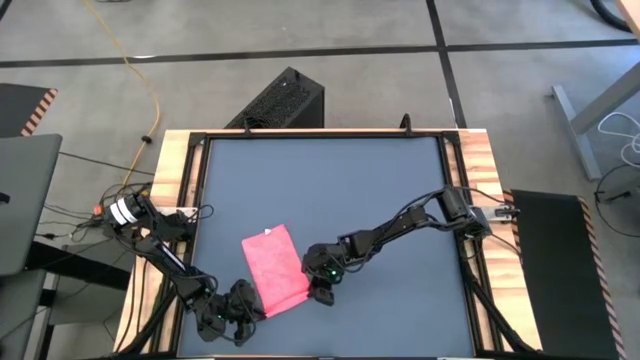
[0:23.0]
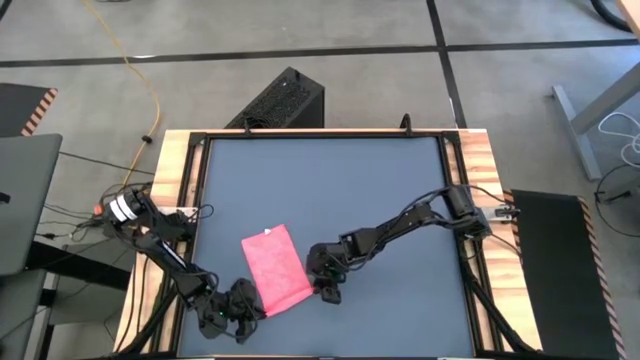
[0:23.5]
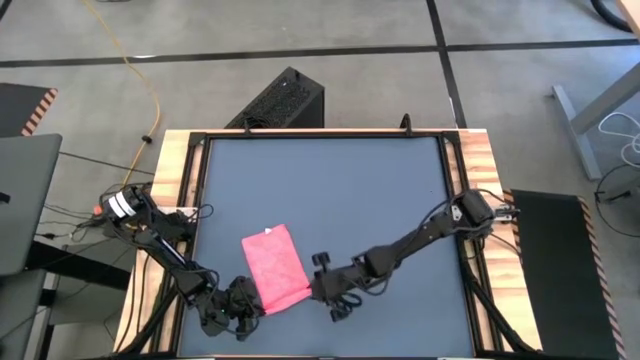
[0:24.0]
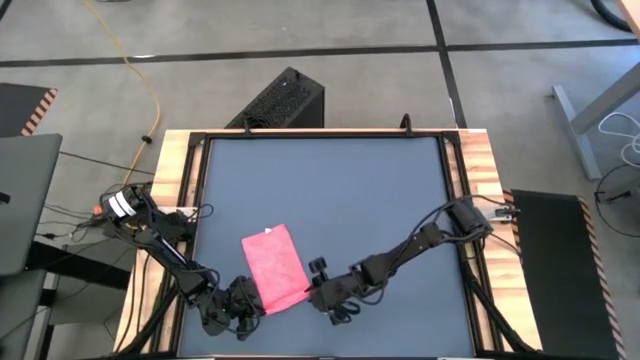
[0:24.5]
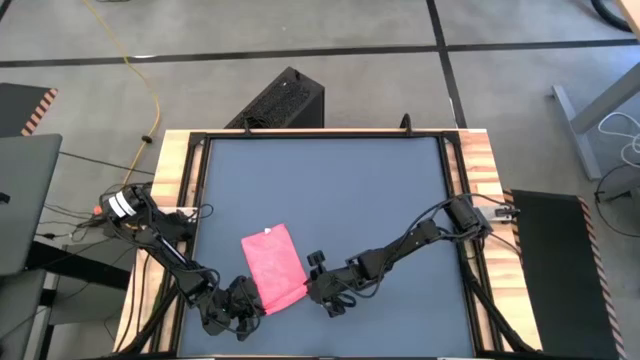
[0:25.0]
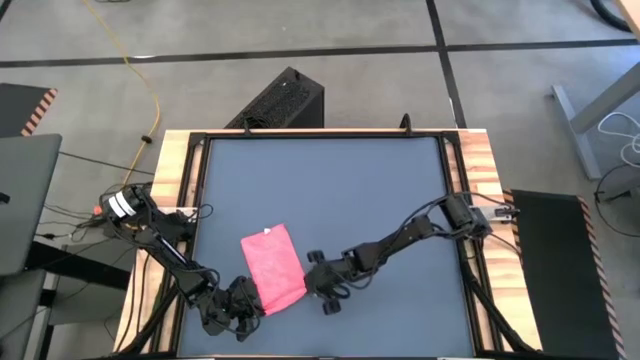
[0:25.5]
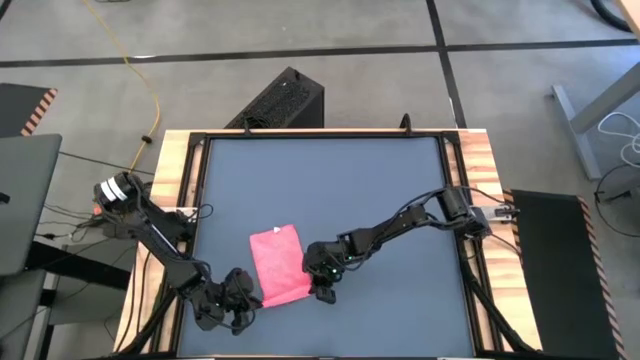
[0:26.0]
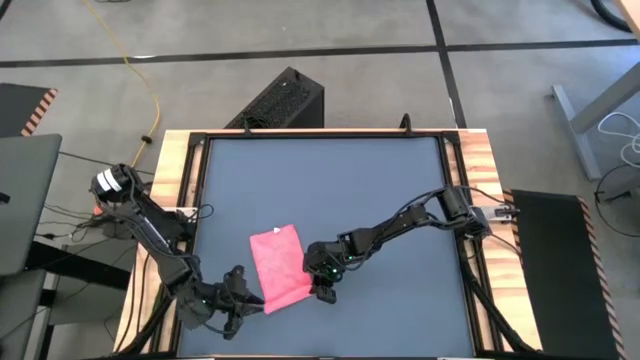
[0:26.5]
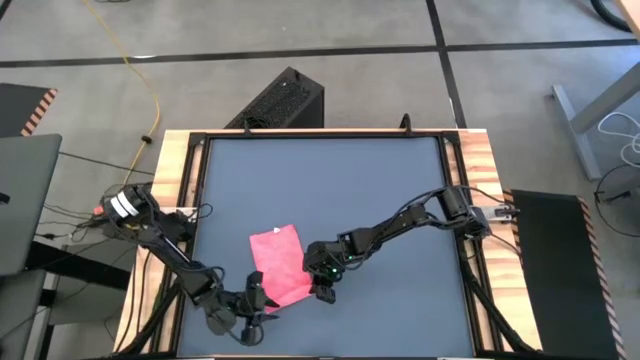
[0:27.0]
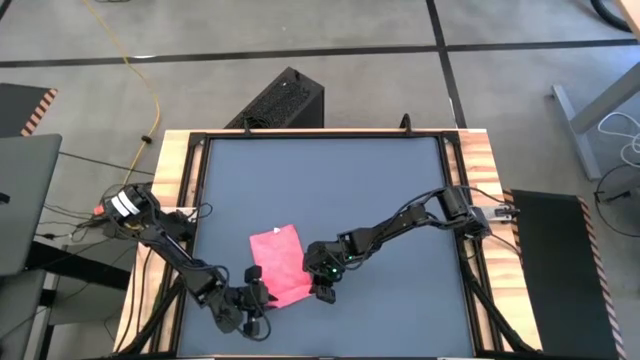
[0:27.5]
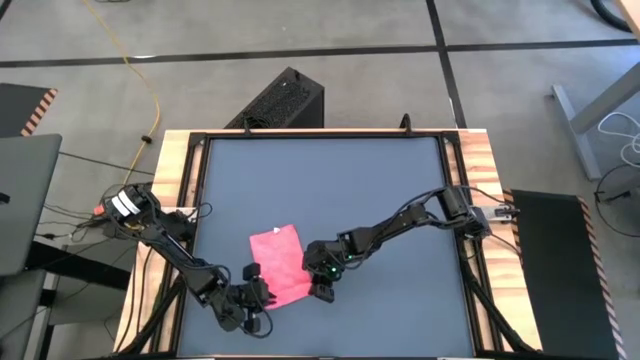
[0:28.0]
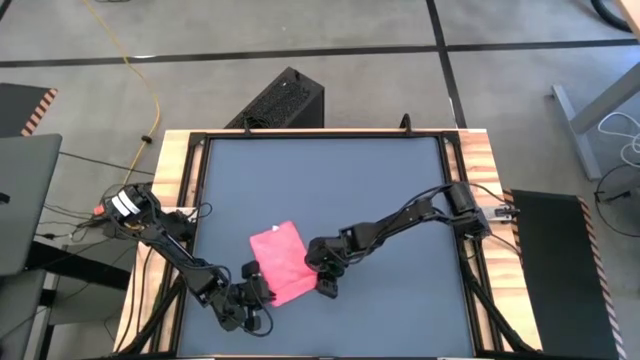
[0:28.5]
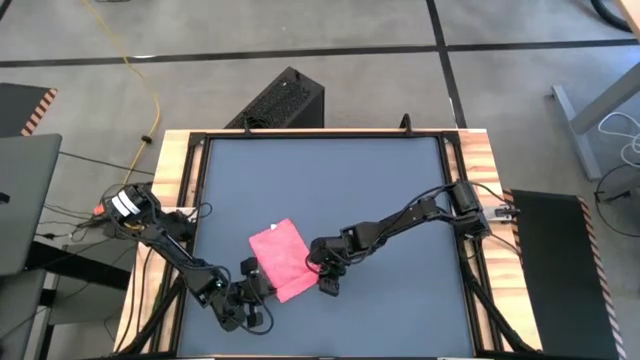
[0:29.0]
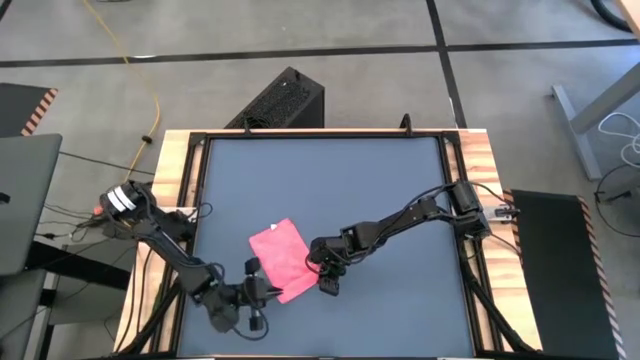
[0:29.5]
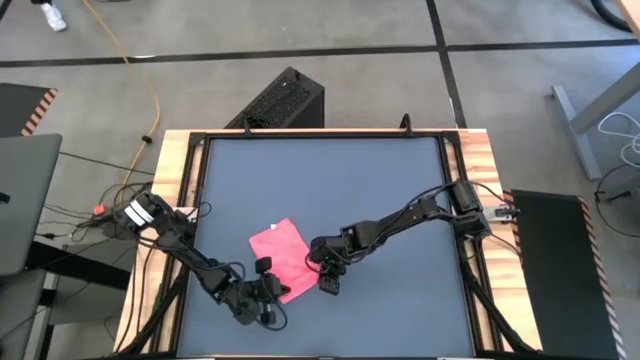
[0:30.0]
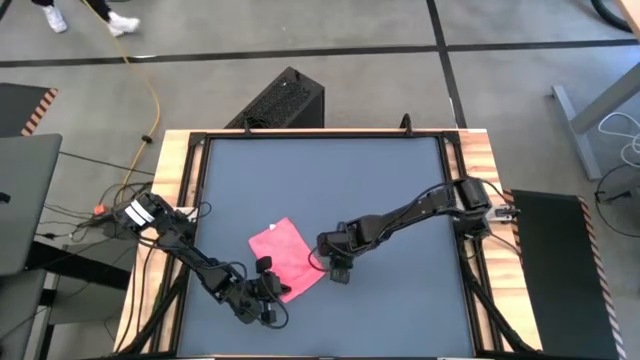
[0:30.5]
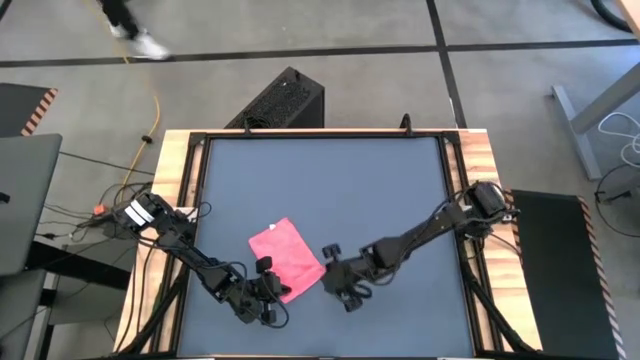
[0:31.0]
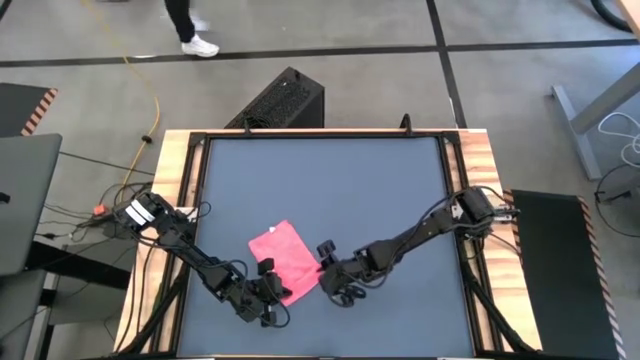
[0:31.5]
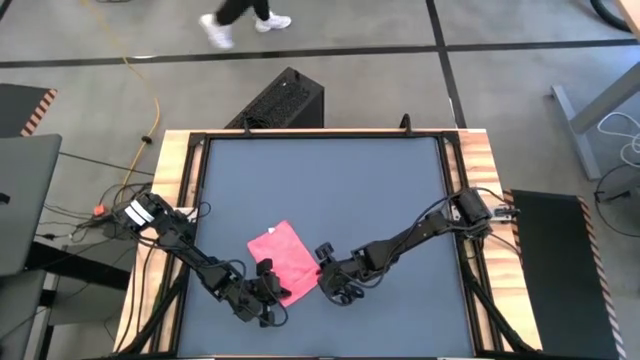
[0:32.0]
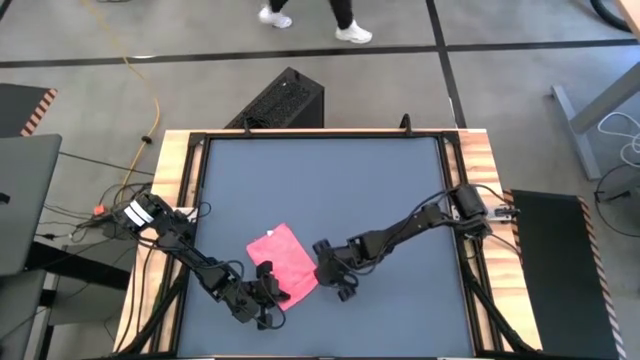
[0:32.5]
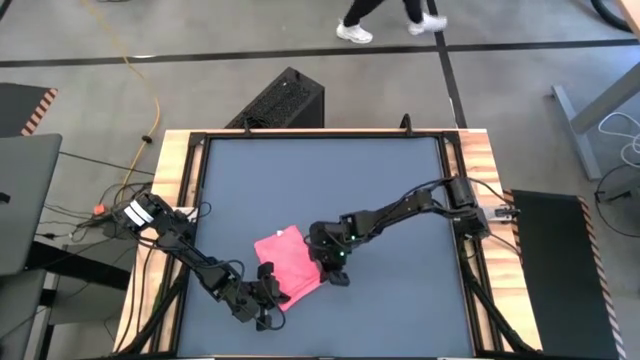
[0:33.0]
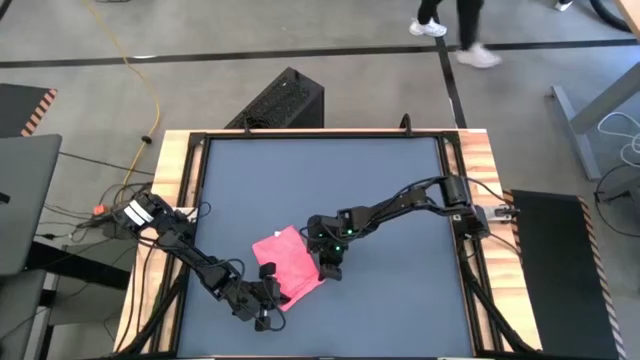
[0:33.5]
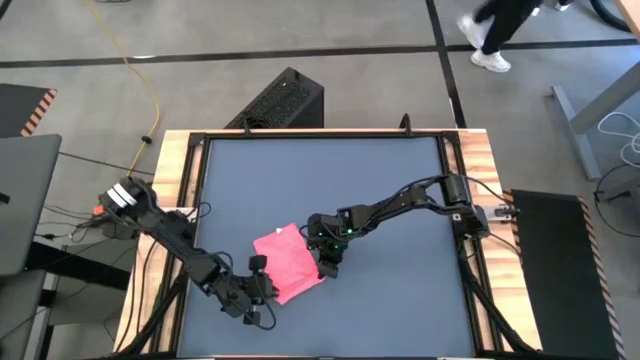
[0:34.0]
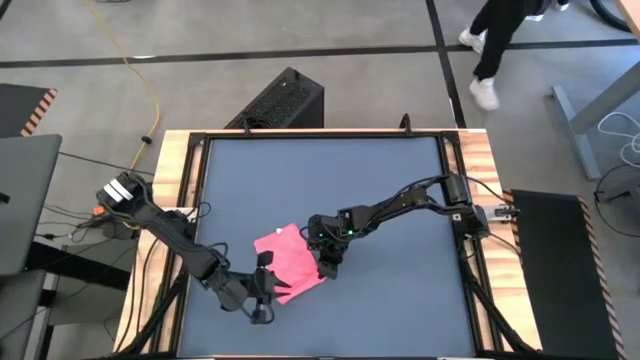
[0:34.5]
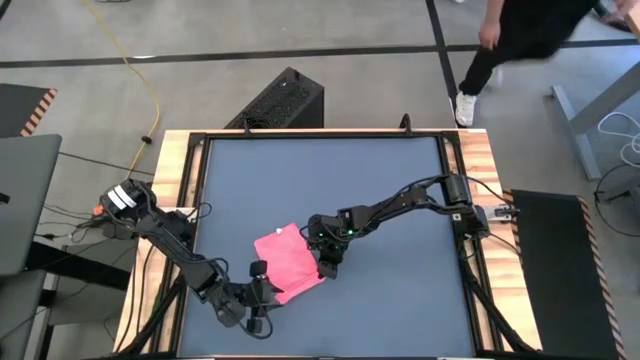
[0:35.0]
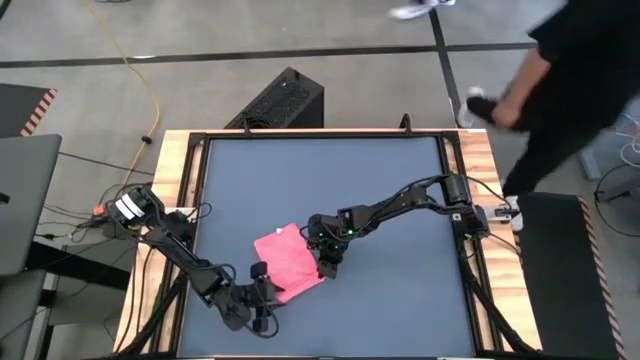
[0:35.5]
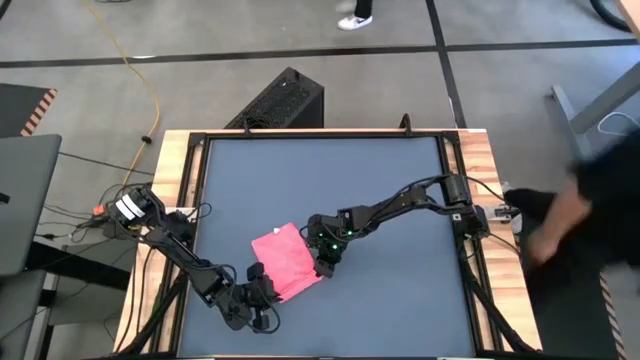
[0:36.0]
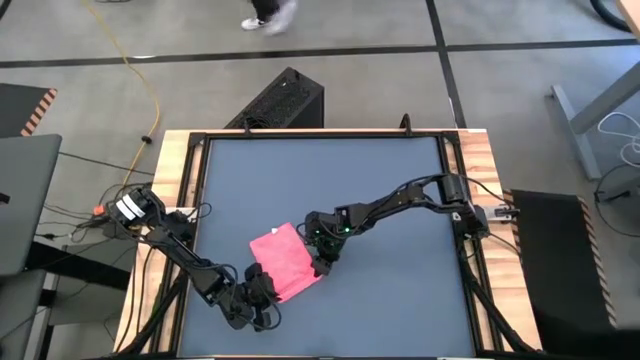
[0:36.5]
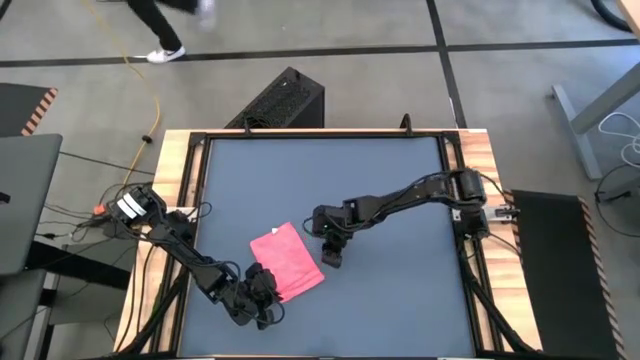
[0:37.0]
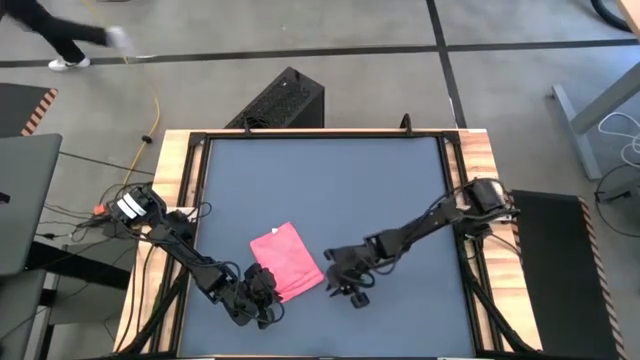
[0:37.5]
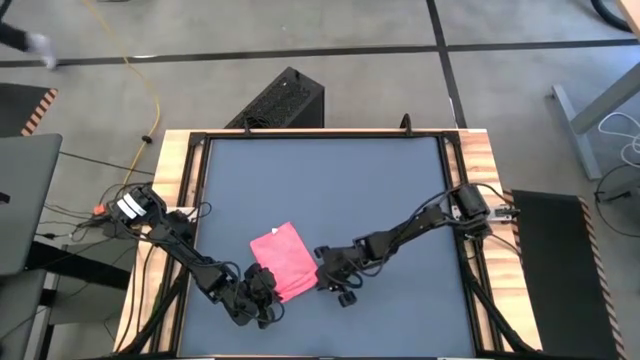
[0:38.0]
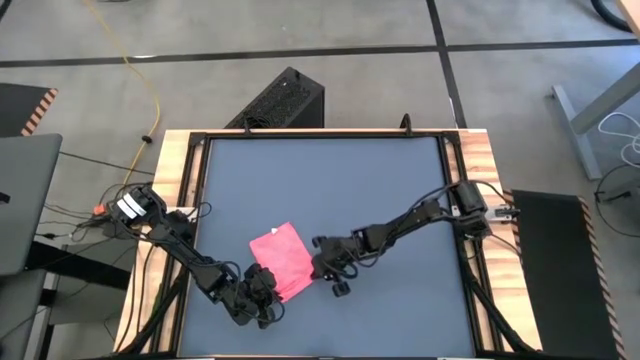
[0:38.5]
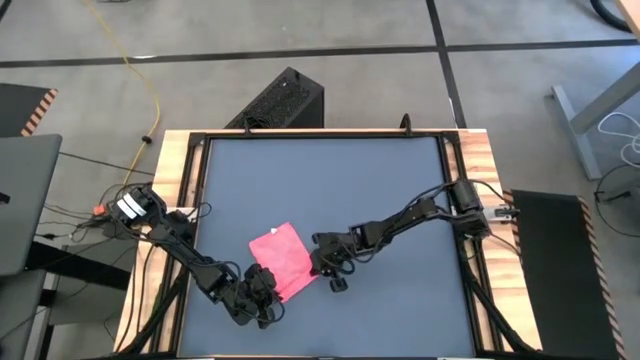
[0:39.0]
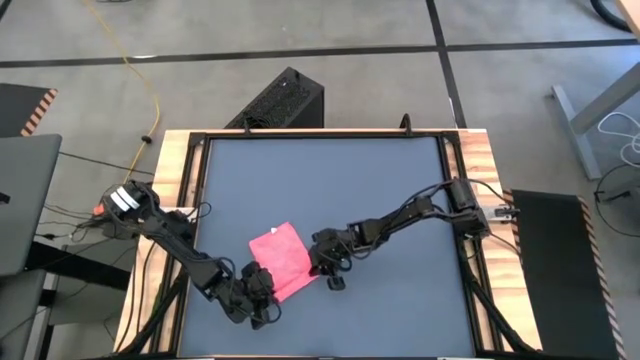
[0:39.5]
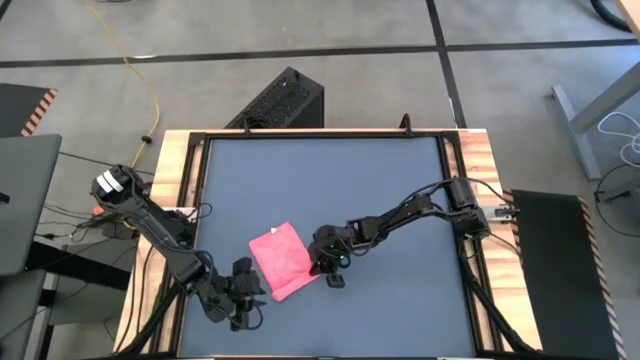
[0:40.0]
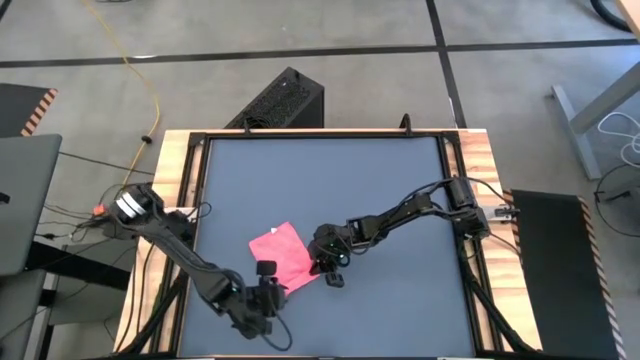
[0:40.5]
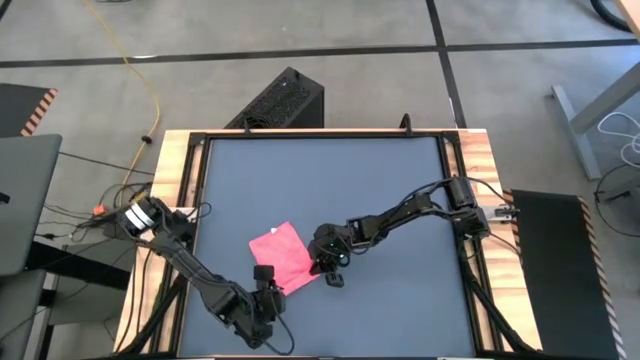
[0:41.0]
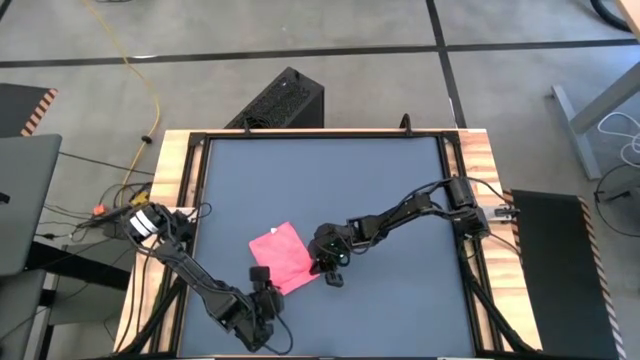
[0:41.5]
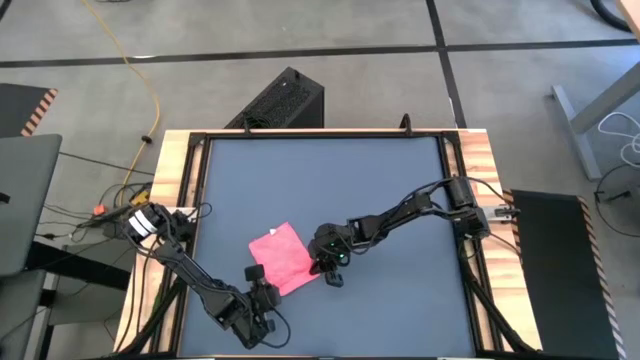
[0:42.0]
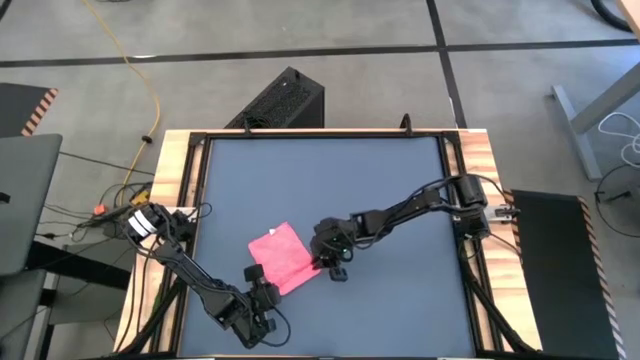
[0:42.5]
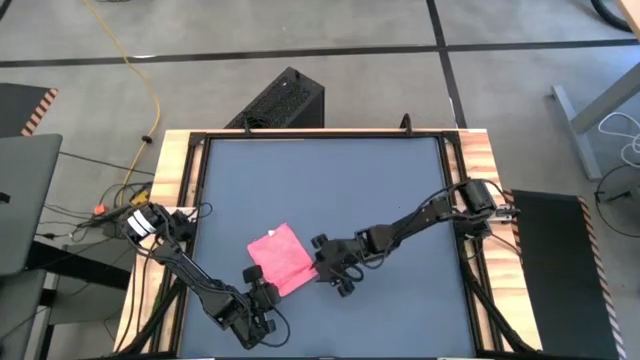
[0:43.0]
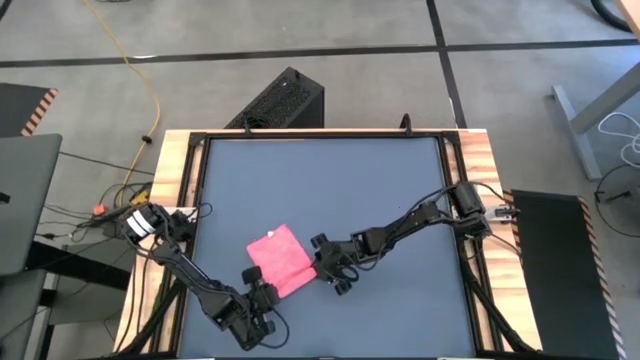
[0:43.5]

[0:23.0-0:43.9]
Task: Roll towel
Roll the red towel
